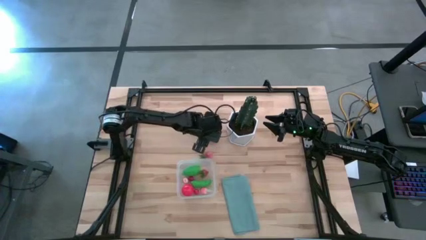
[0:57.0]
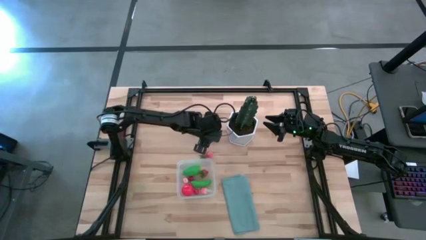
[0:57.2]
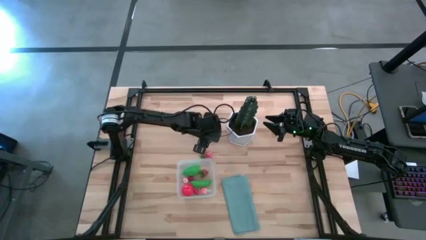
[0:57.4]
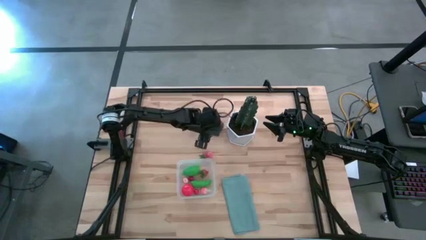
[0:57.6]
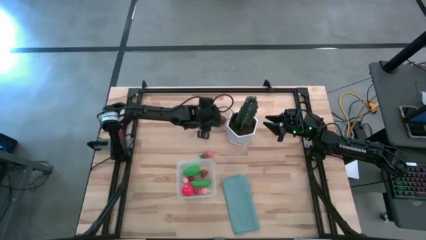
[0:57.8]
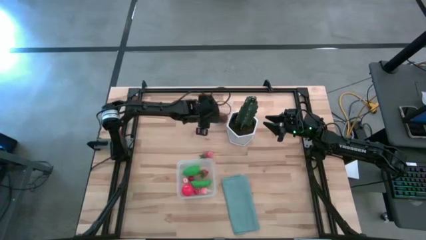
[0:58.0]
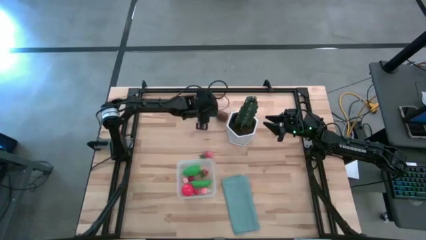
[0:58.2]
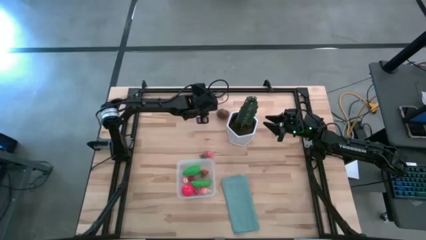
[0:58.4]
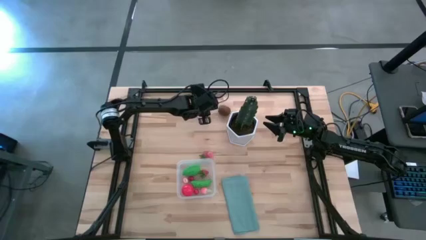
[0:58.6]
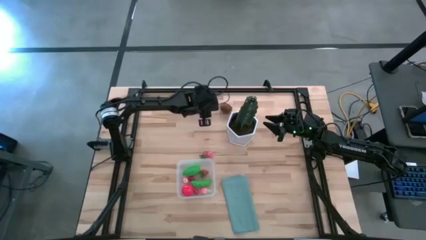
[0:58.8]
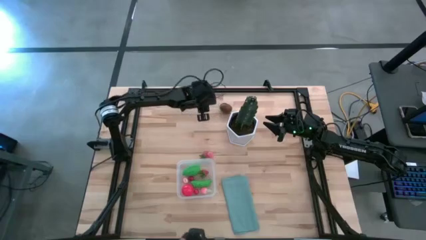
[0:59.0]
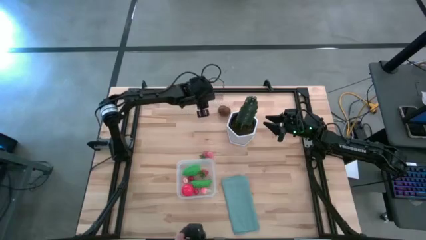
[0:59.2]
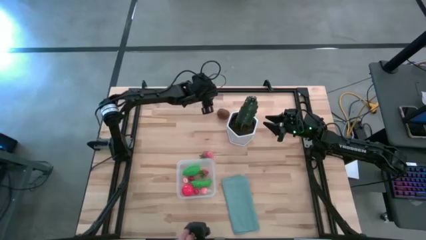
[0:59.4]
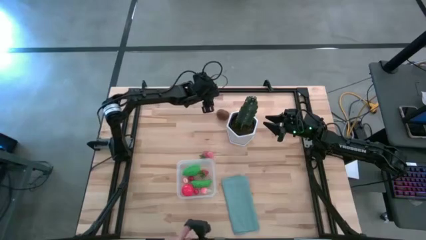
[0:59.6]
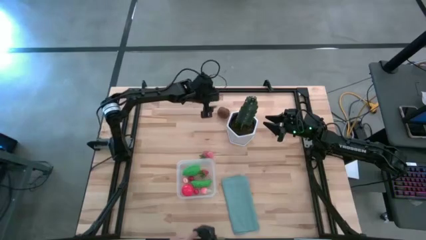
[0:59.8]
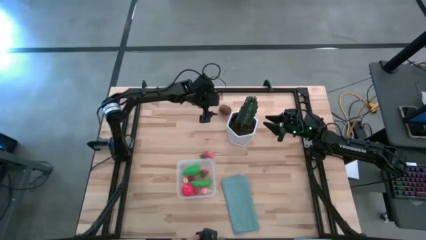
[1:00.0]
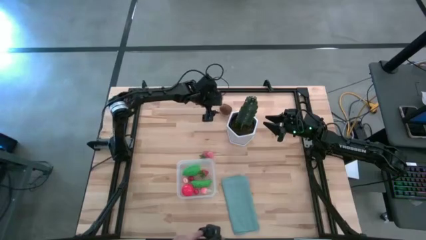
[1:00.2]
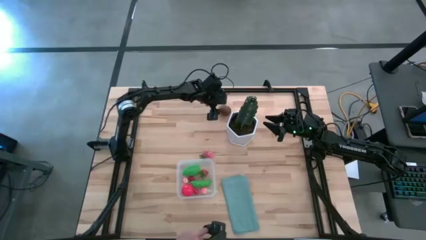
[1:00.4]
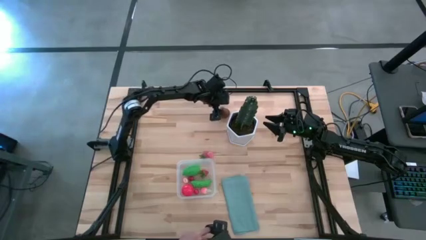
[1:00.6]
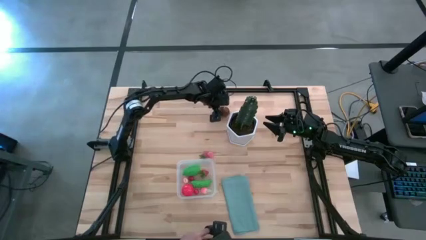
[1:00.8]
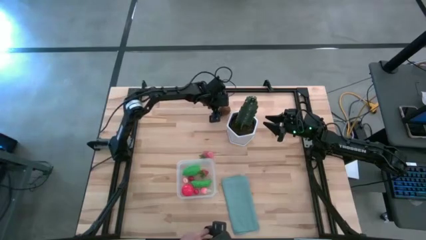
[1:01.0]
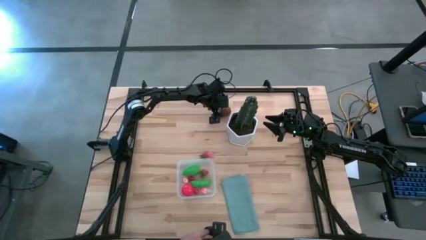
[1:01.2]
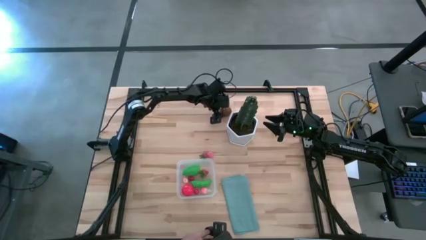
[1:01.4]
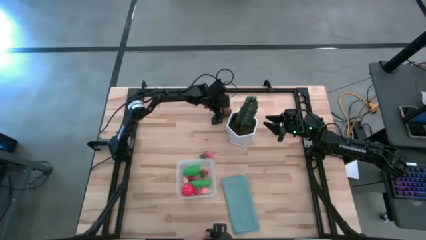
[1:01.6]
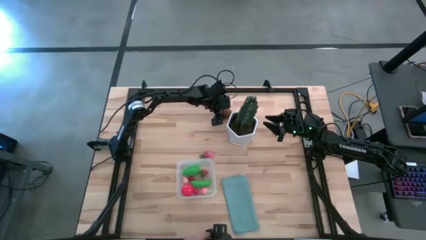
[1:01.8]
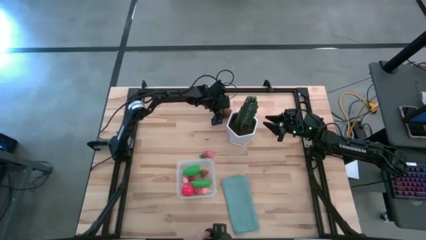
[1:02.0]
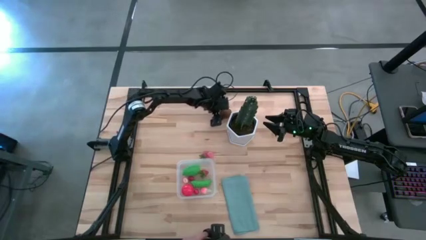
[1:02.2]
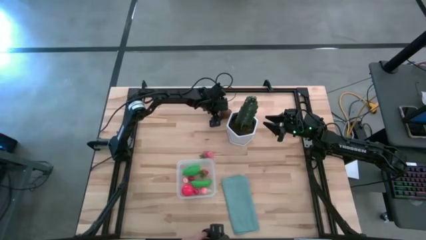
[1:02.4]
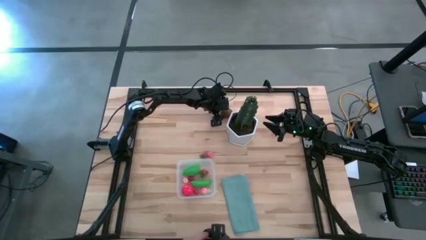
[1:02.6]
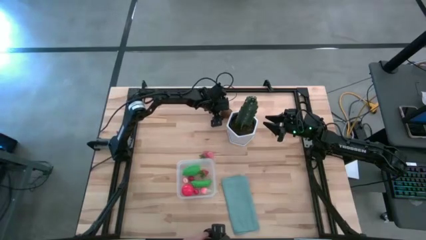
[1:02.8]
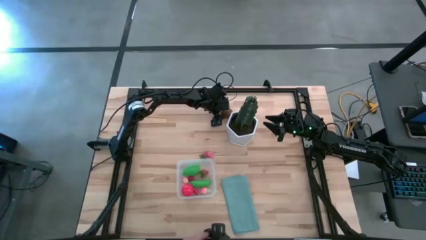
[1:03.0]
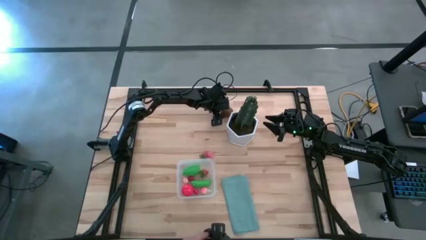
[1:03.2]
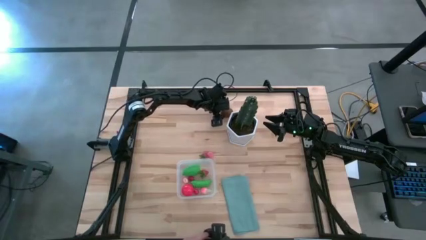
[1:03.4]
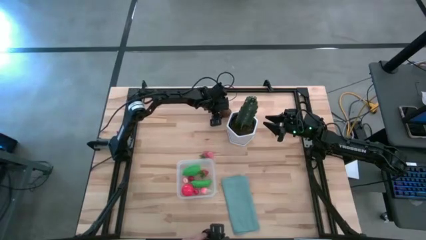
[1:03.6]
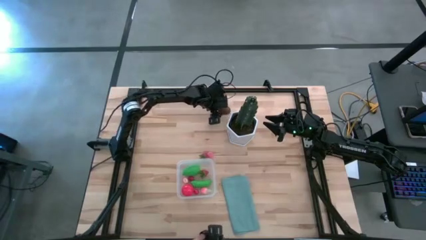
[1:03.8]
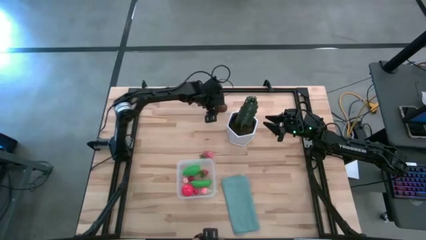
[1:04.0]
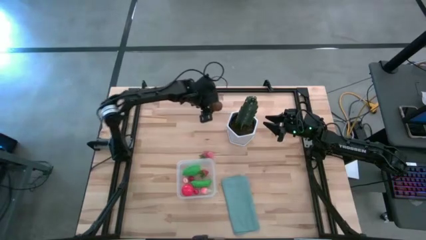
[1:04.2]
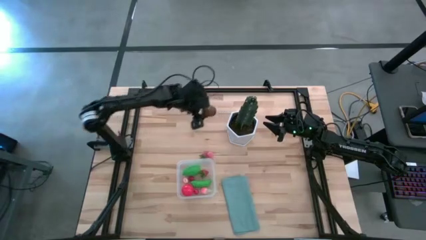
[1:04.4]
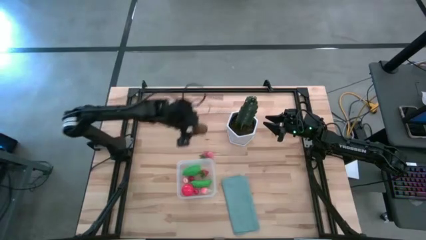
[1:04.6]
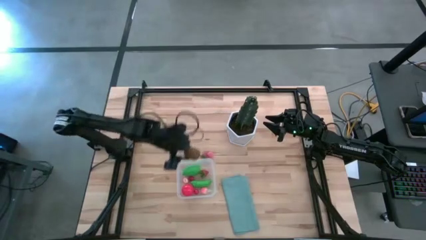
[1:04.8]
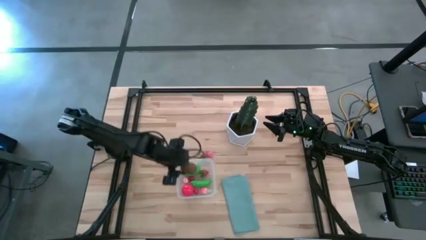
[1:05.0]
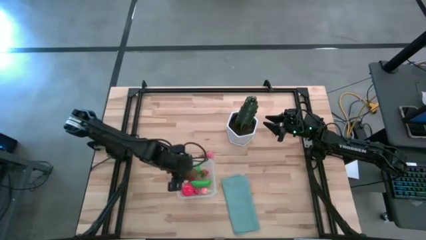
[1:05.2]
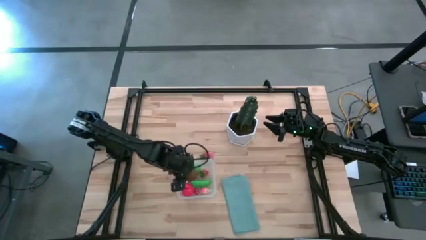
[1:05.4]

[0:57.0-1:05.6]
Task: Pick and placing Produce into tupperware
Put the kiwi into the transparent bin

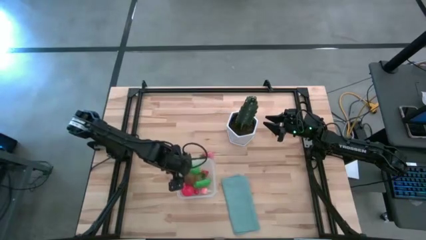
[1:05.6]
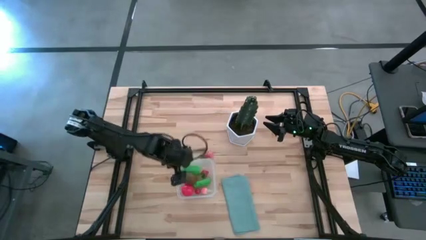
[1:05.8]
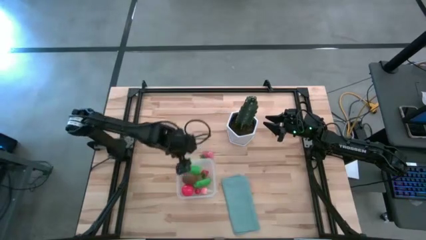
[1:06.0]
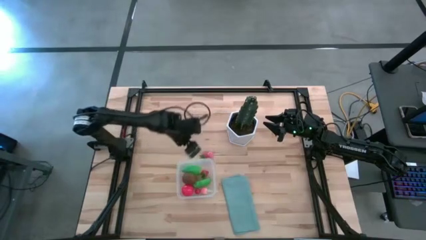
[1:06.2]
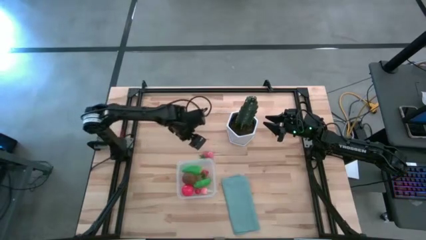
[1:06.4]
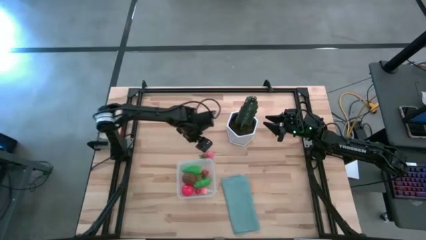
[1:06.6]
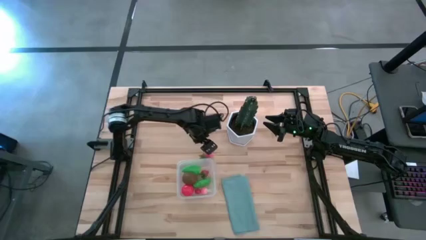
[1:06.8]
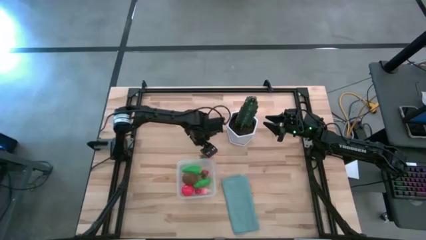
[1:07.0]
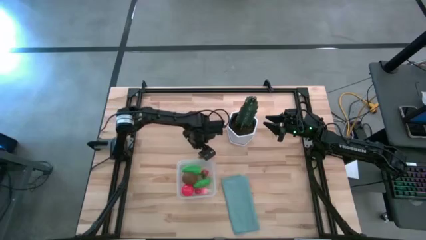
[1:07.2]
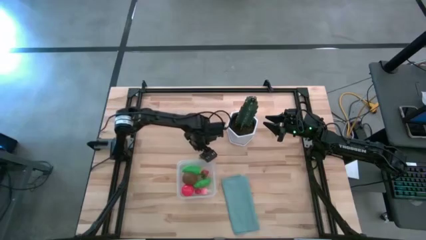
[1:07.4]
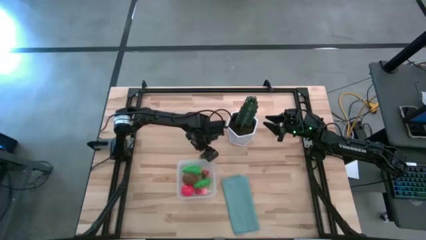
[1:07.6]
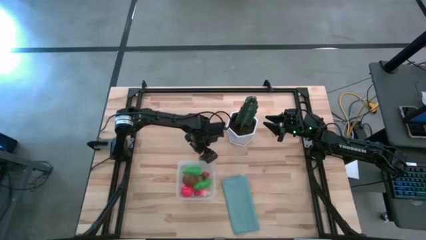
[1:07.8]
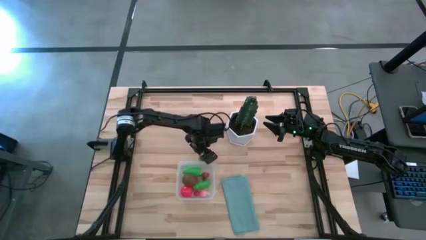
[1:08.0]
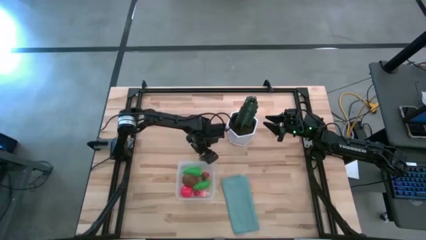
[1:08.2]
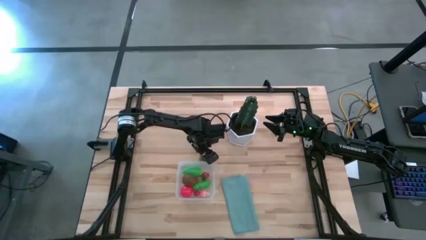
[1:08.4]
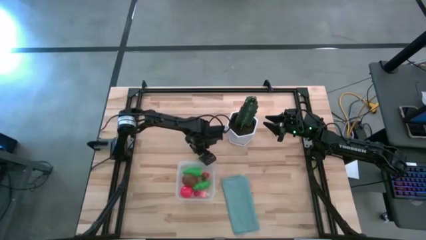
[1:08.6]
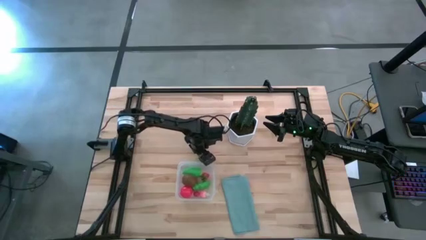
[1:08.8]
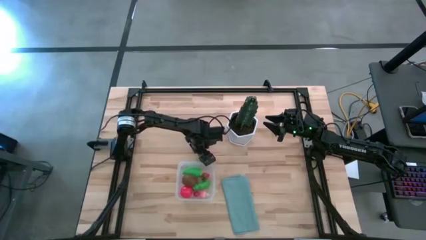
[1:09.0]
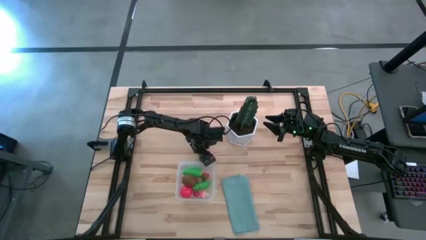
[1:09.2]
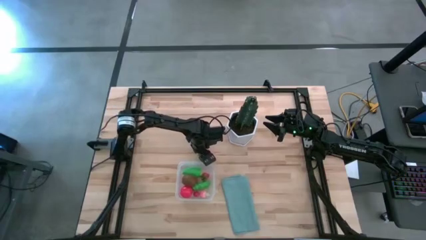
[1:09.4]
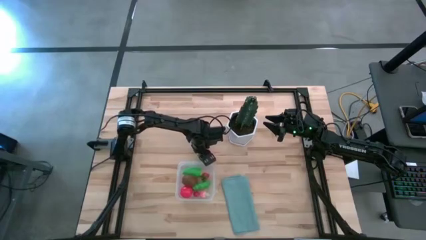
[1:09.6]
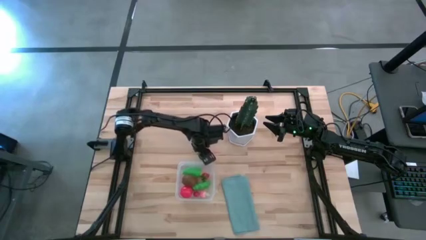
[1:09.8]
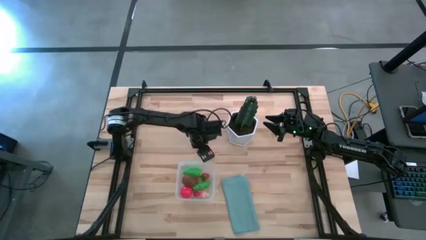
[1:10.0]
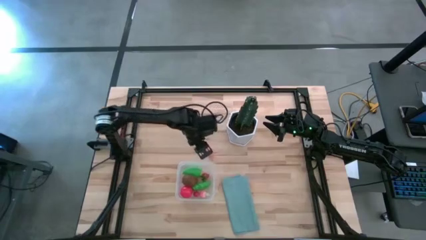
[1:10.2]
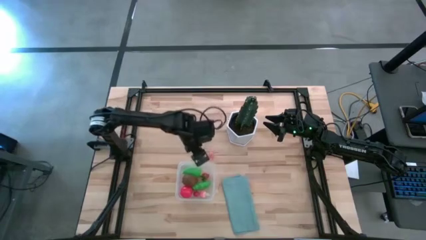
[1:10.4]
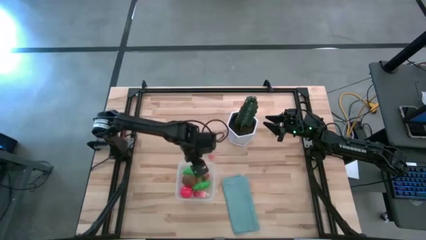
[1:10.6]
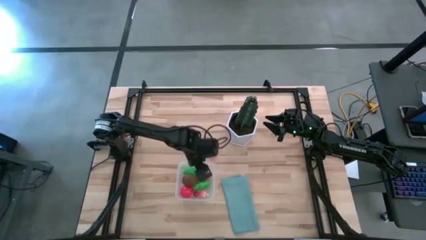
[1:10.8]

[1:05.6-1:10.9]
Put the red strawberry into the transparent bin

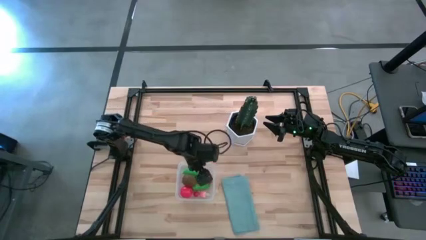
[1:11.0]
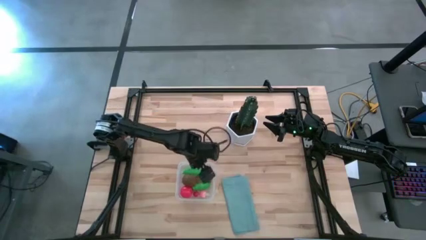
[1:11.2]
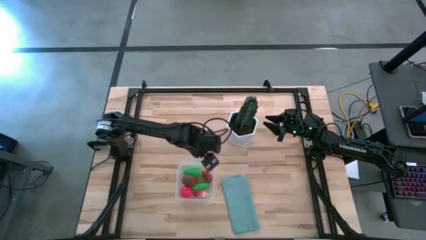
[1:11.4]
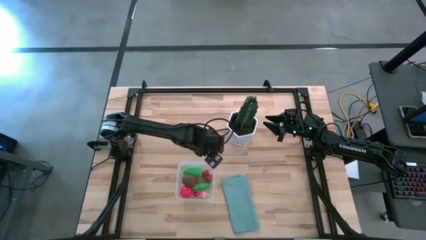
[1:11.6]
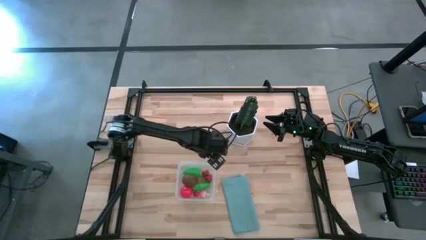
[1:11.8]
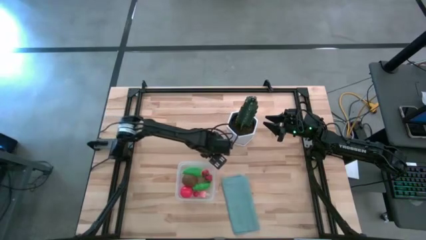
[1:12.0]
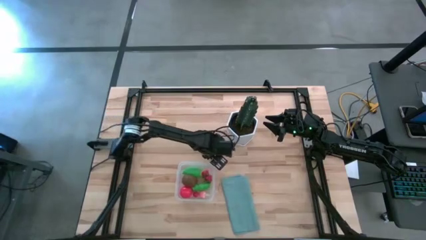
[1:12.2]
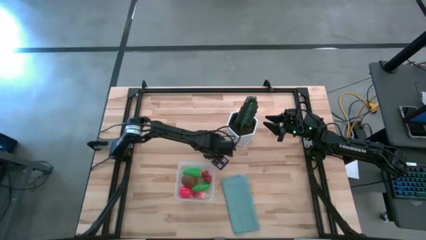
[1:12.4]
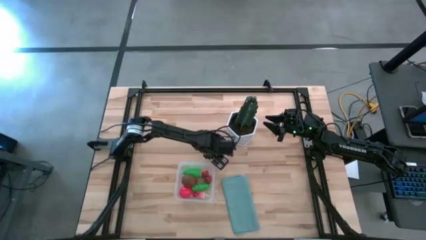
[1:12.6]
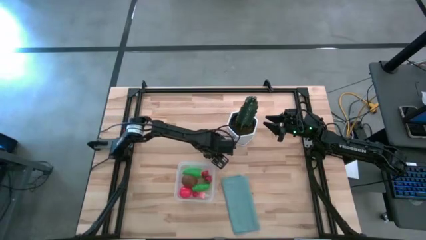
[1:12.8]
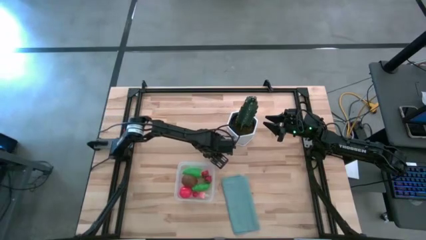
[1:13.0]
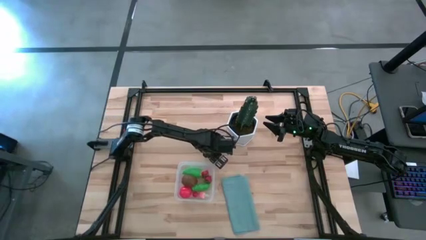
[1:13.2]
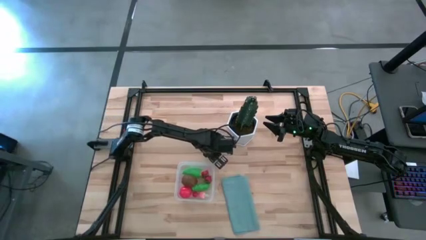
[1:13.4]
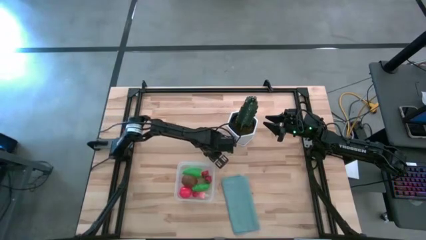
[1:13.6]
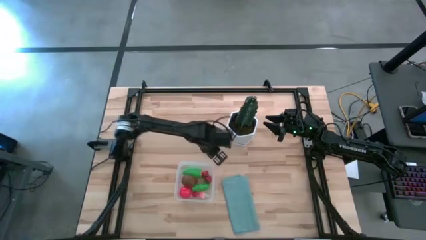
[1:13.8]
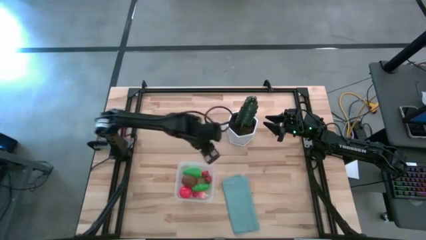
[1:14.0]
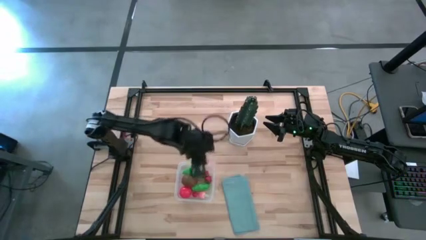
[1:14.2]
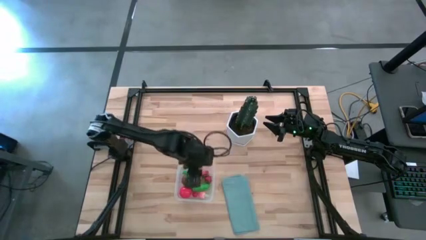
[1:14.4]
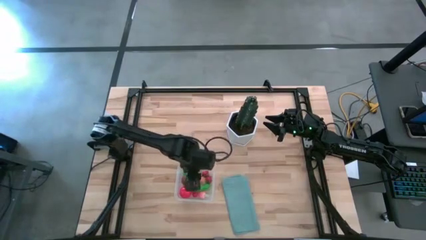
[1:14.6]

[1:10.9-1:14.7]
Put the pink peach into the transparent bin
